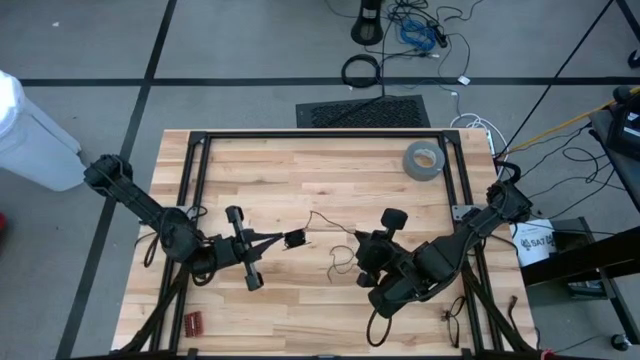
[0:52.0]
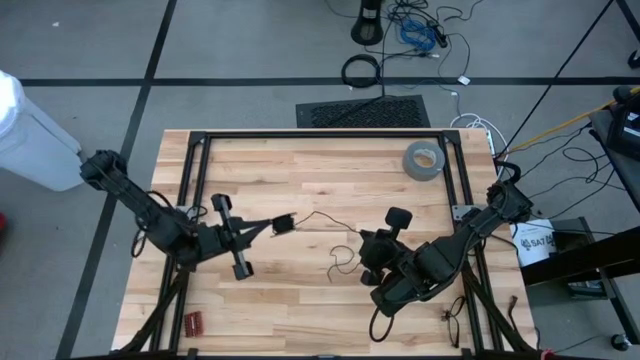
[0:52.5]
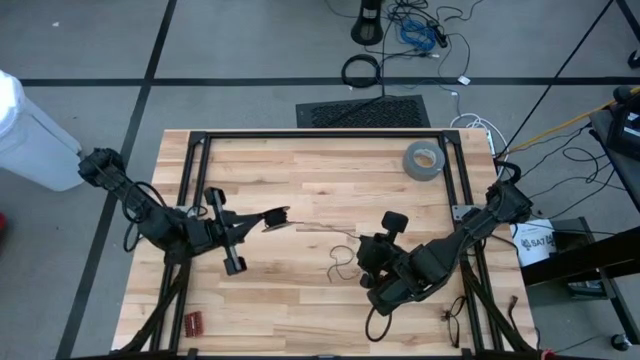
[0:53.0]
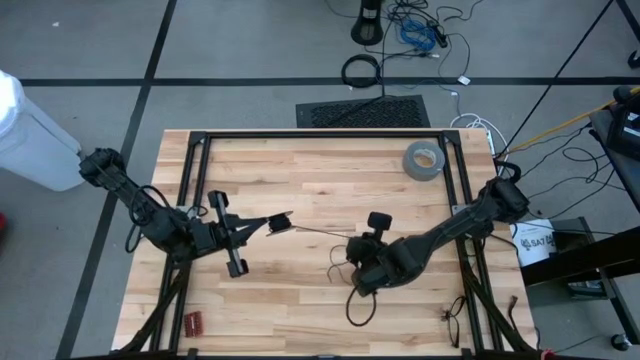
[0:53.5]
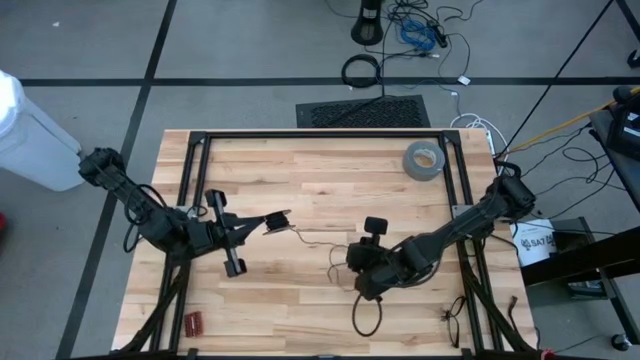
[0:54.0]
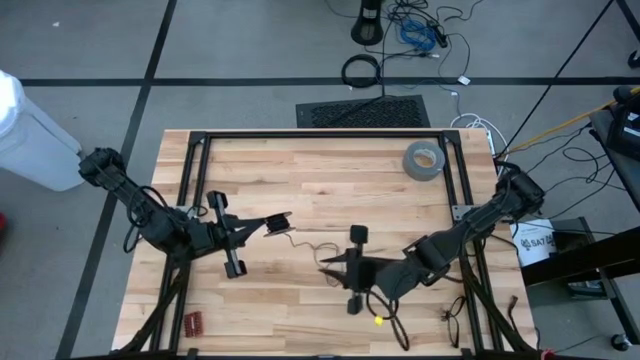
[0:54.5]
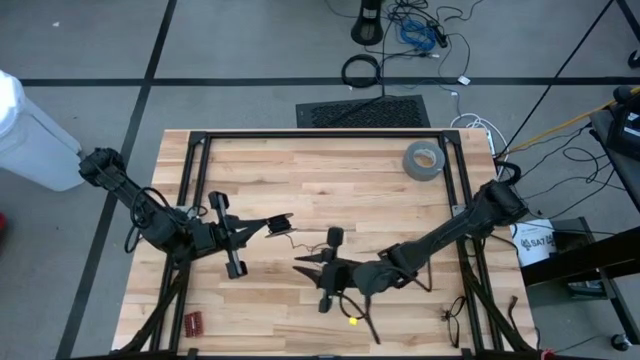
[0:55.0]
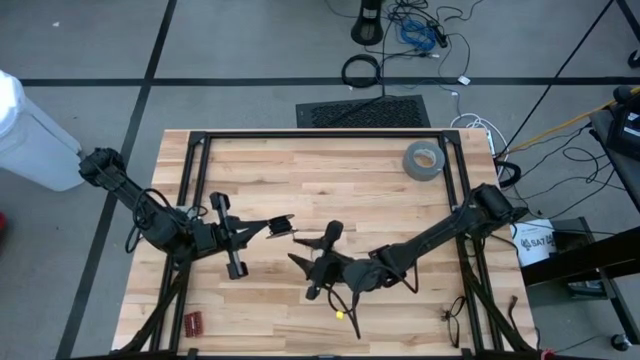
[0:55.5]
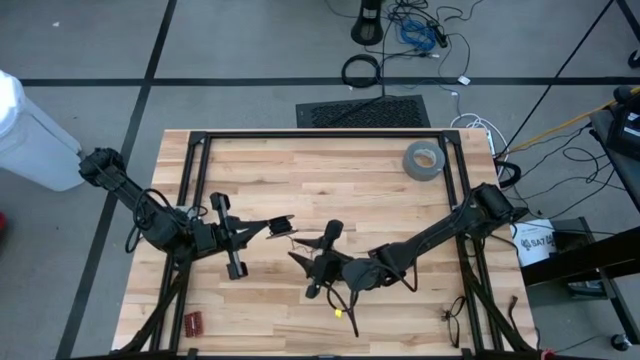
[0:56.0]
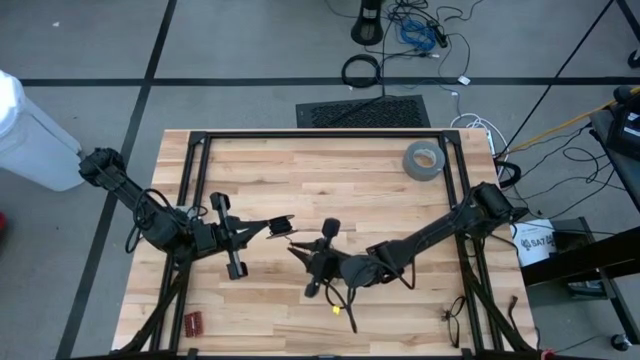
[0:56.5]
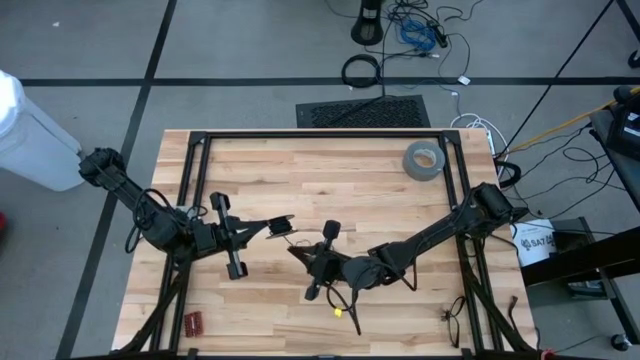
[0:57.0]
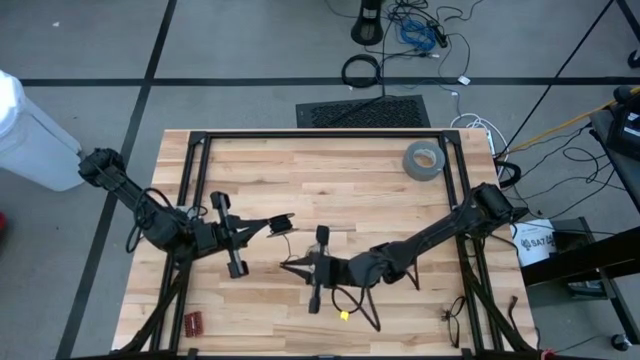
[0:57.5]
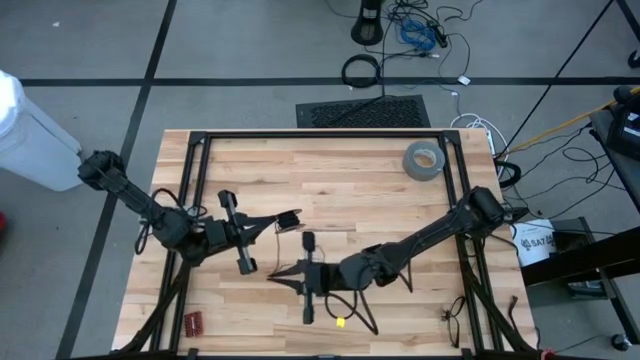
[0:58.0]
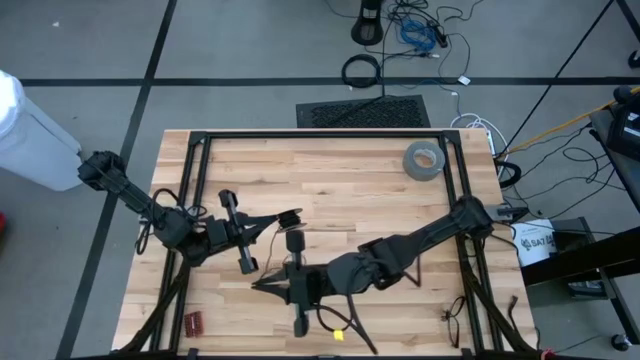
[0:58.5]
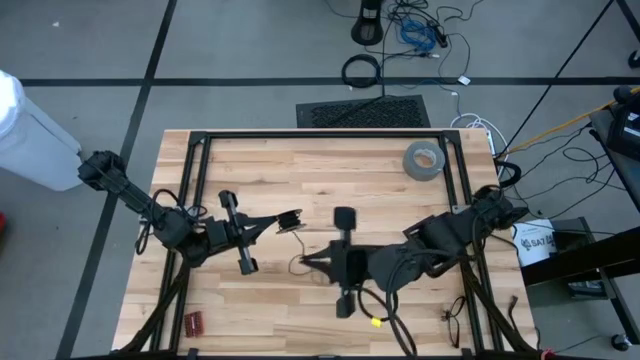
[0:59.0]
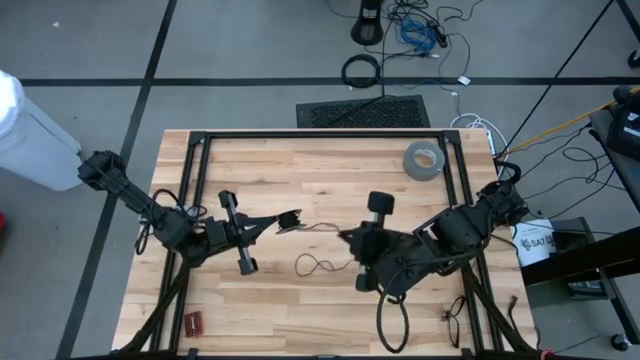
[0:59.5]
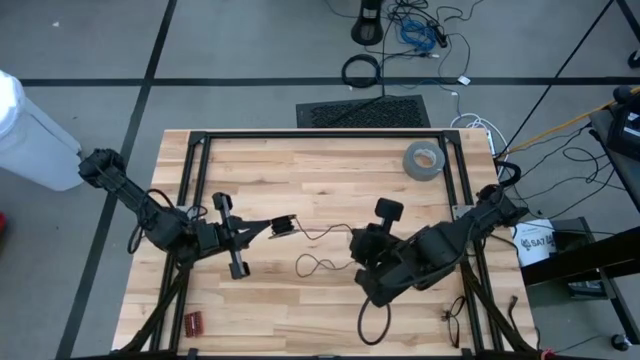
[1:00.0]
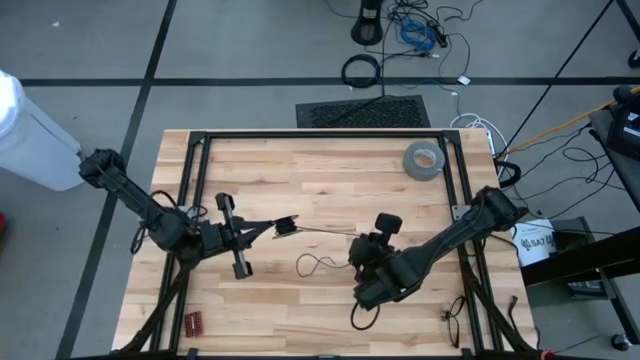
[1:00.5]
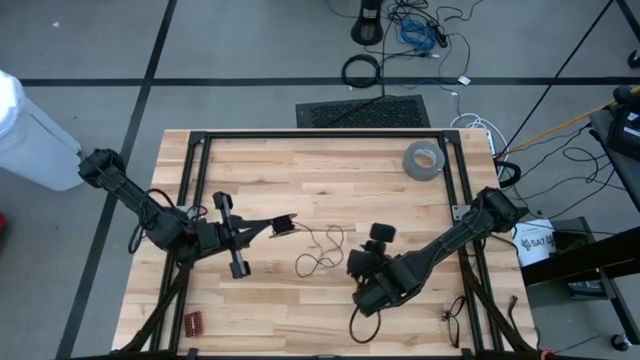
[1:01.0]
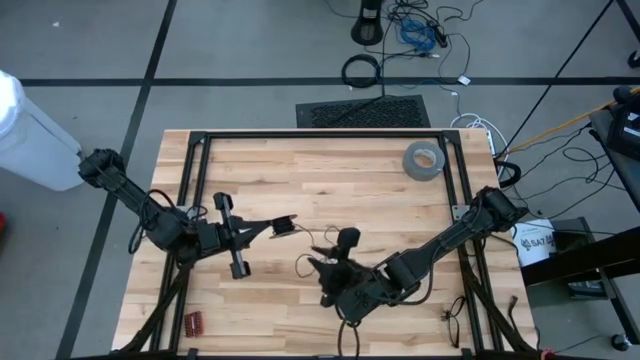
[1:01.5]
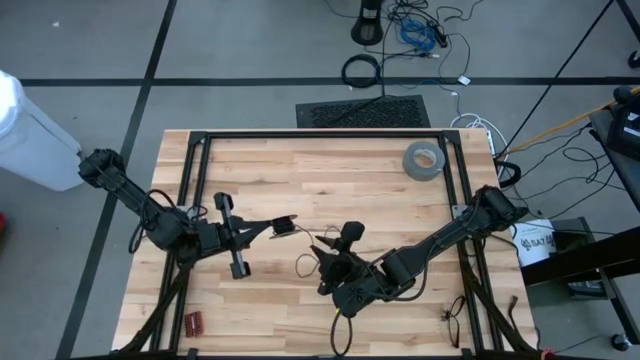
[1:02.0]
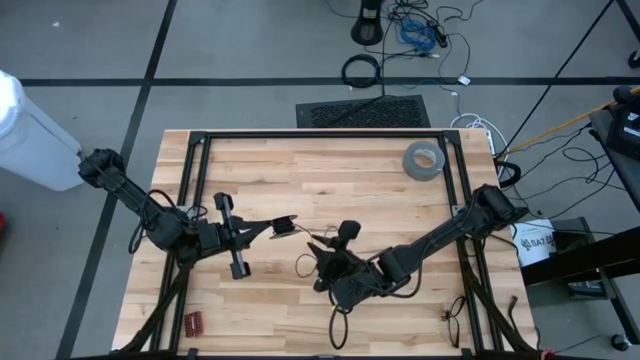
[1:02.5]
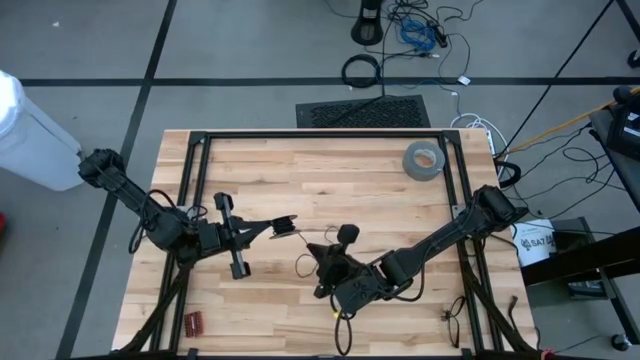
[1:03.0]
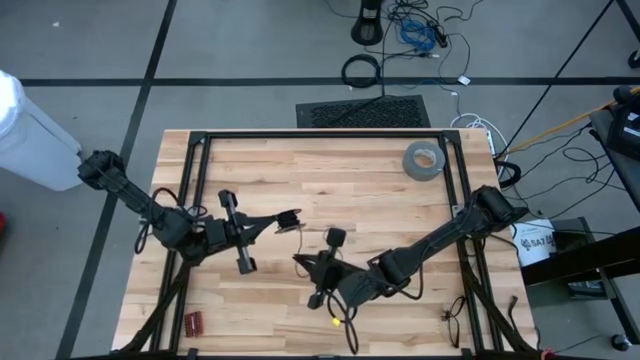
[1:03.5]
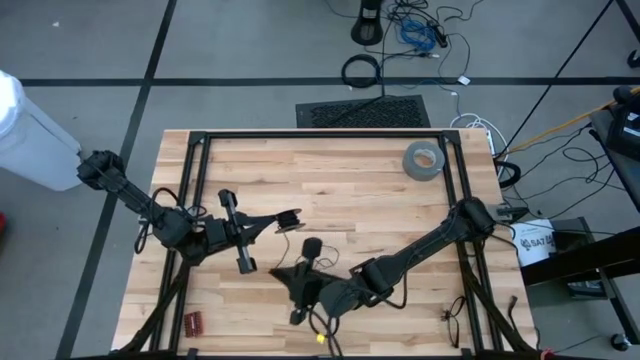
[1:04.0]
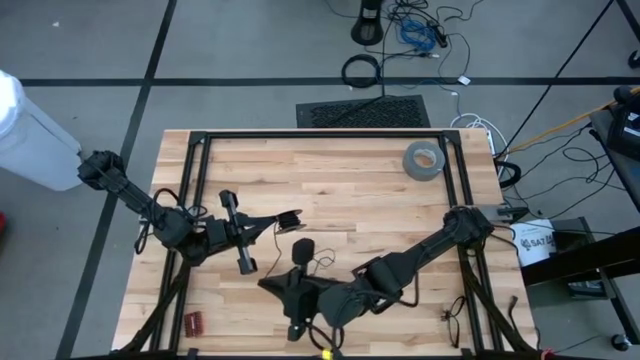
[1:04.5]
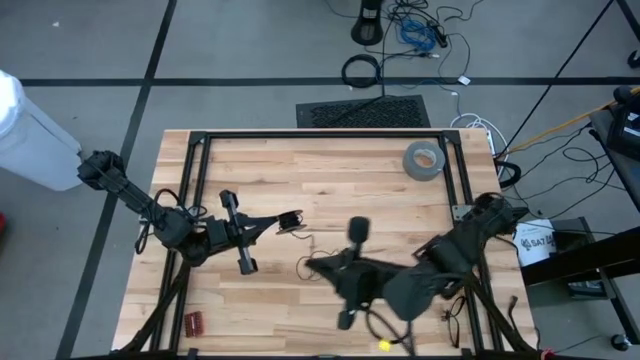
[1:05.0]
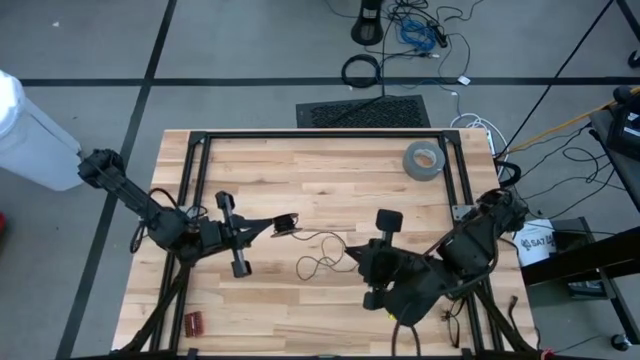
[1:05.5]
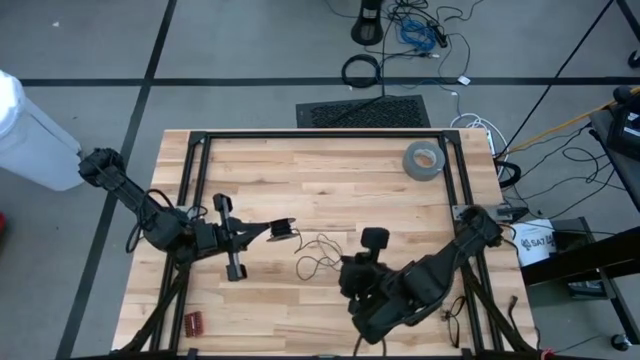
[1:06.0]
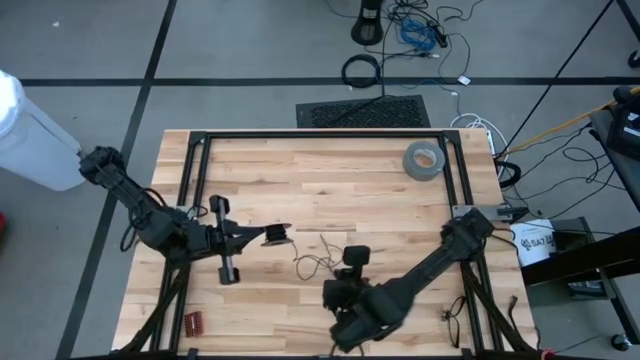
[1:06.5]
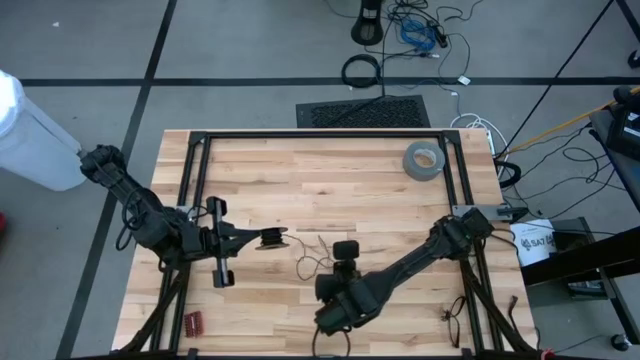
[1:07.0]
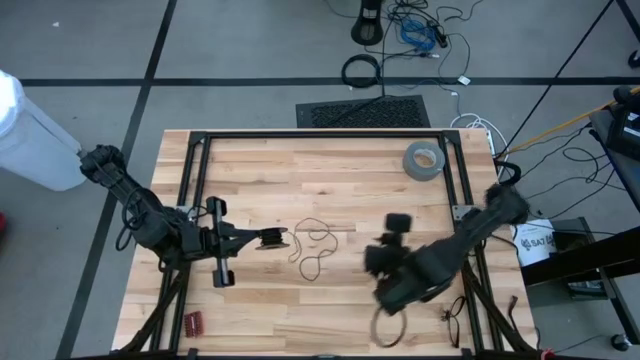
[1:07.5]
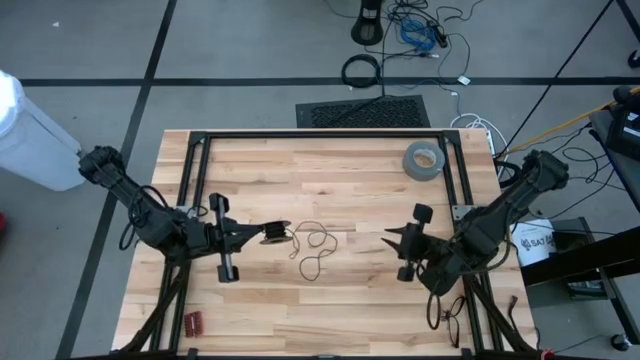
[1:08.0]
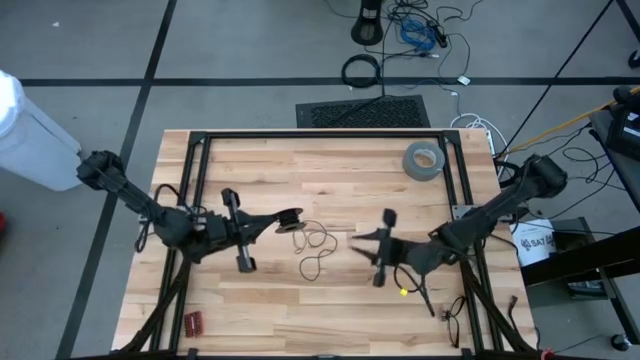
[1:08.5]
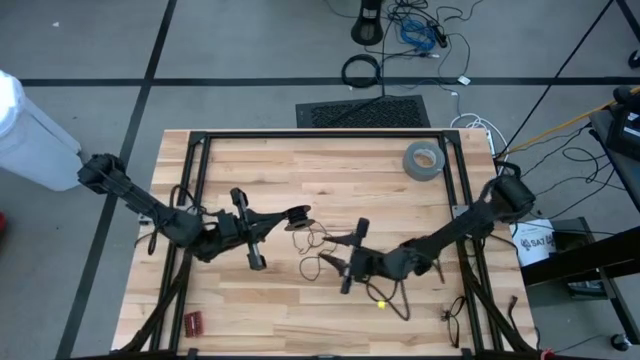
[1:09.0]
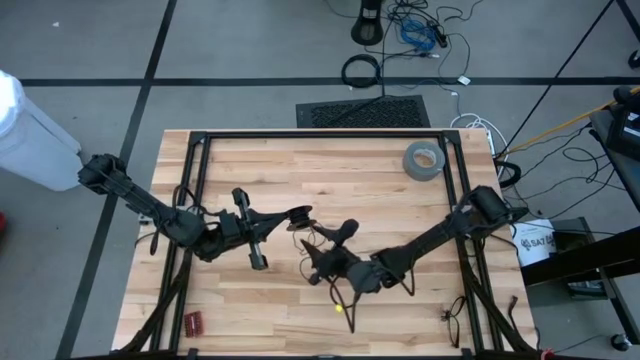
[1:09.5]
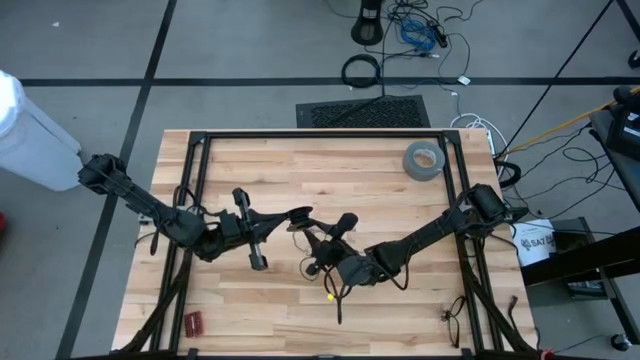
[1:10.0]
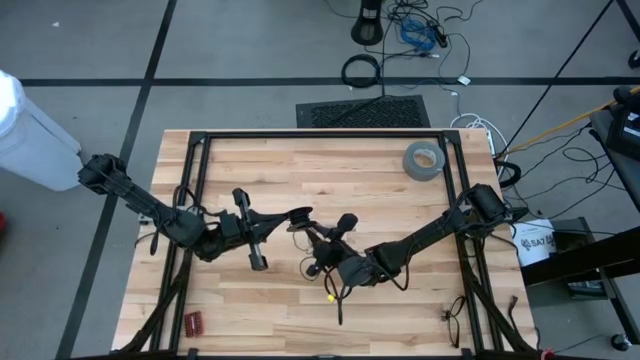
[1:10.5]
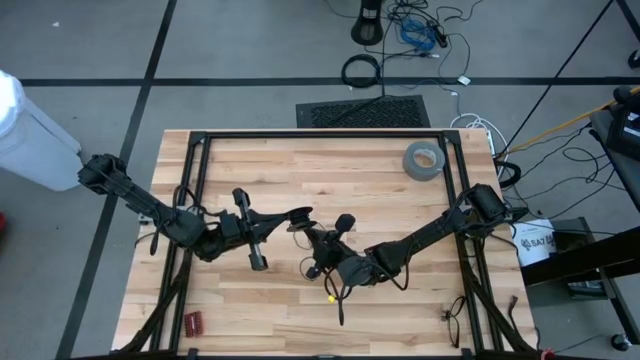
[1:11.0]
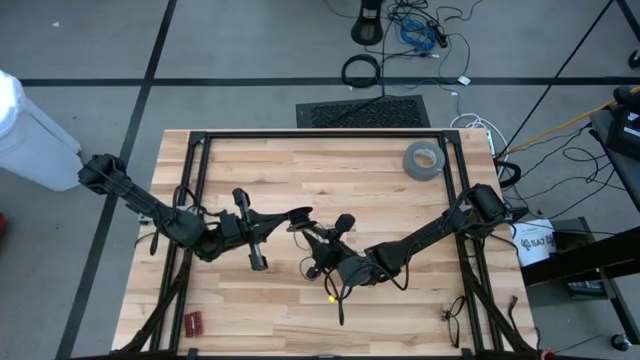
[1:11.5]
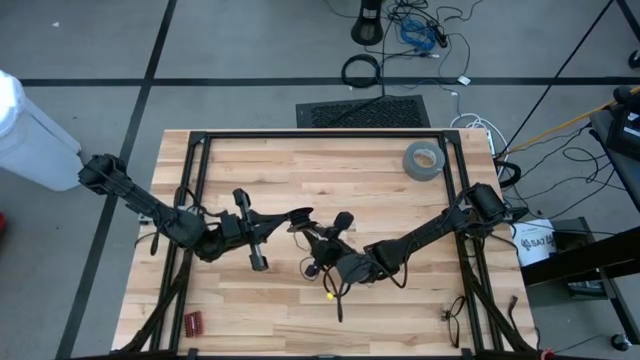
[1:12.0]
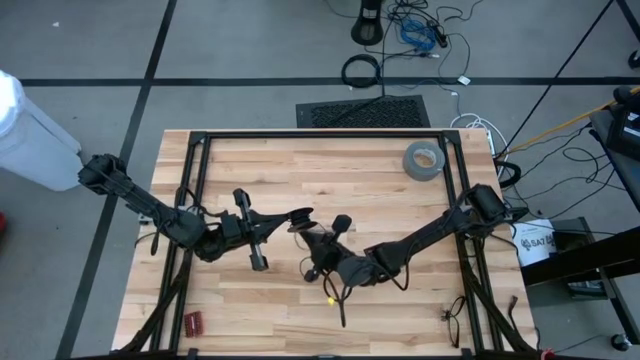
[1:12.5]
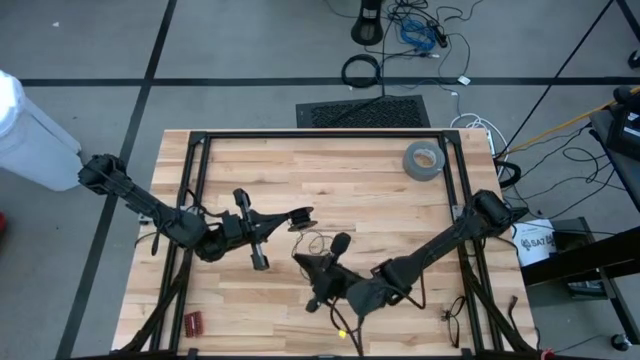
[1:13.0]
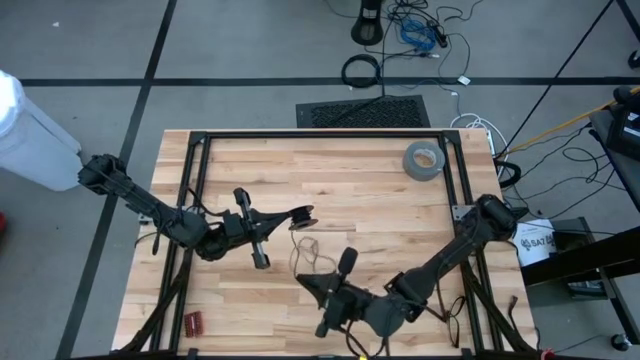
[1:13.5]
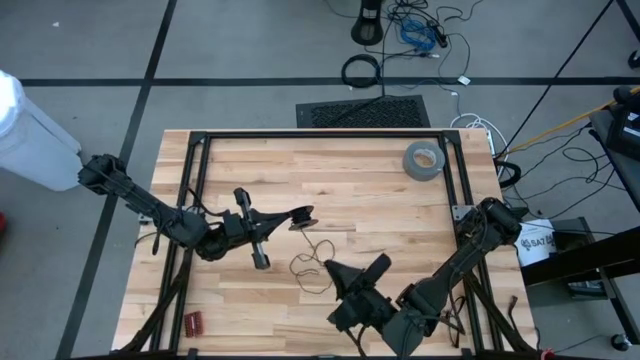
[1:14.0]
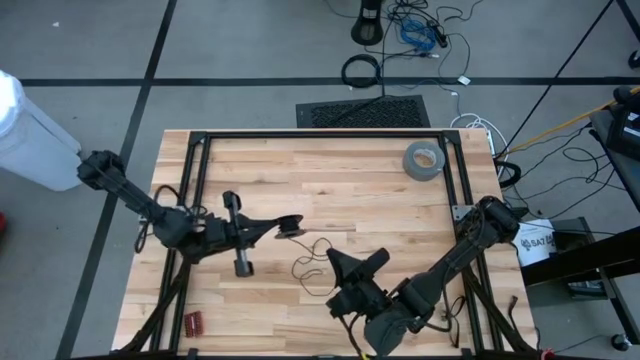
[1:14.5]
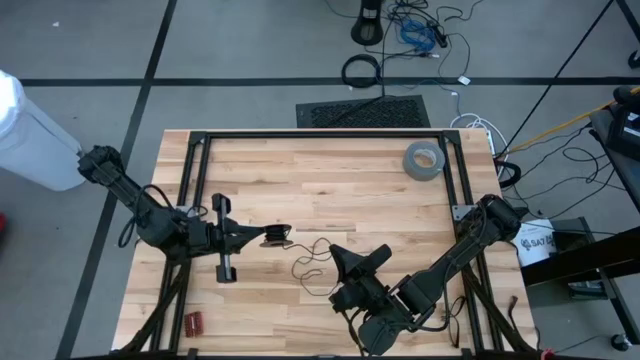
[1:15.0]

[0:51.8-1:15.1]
Task: Coil cords
Uncoil the black wire from the spool
